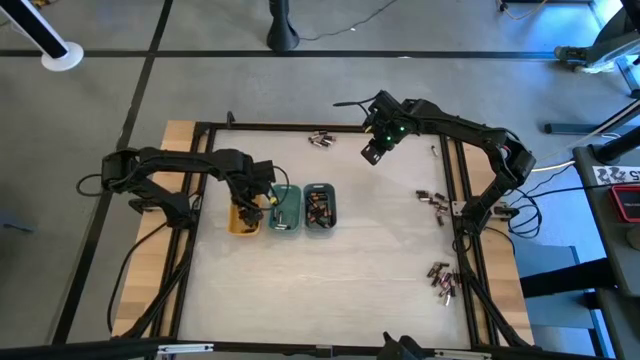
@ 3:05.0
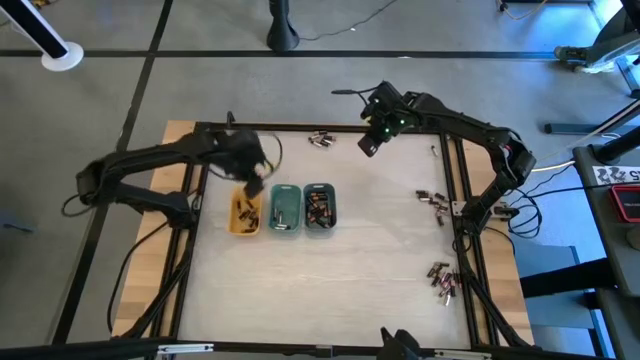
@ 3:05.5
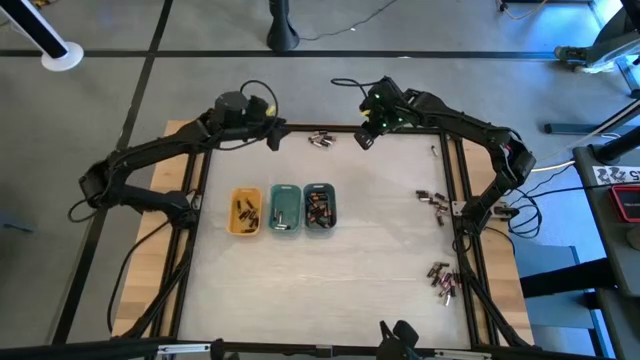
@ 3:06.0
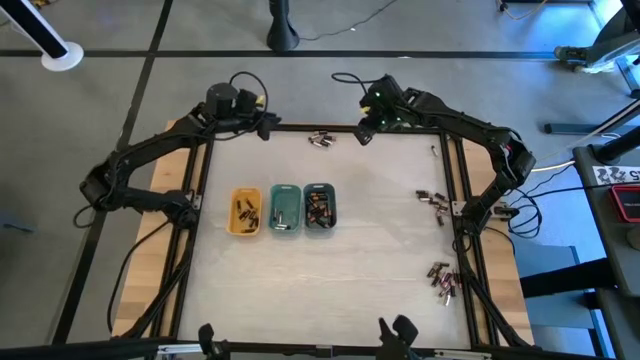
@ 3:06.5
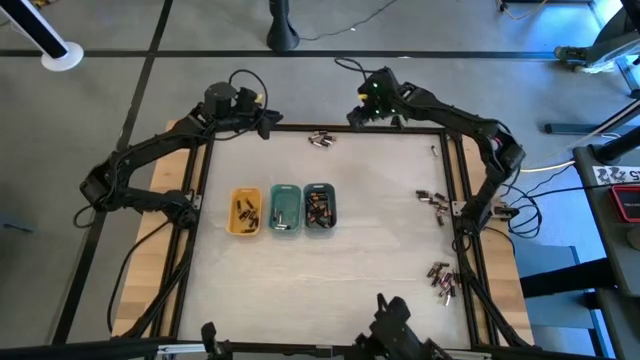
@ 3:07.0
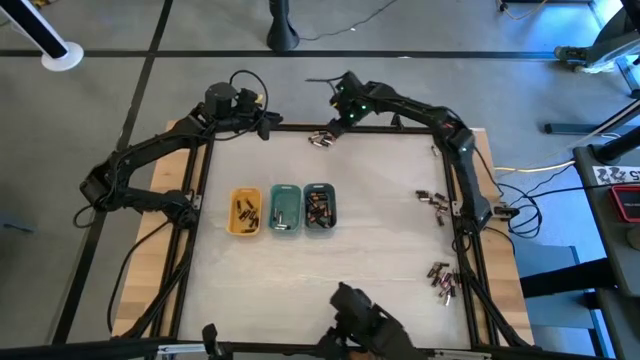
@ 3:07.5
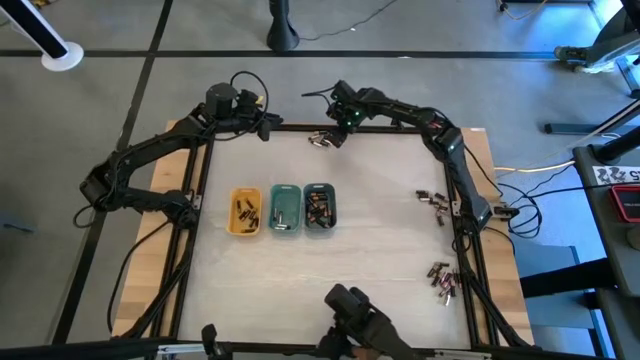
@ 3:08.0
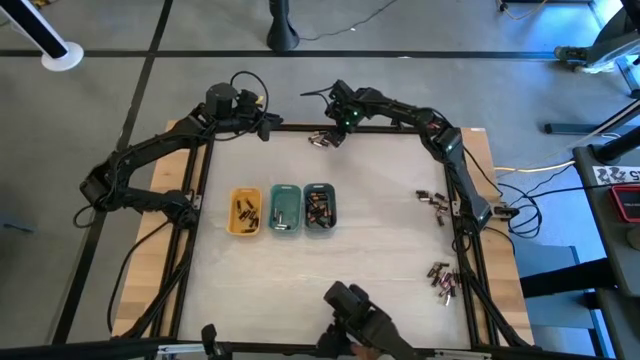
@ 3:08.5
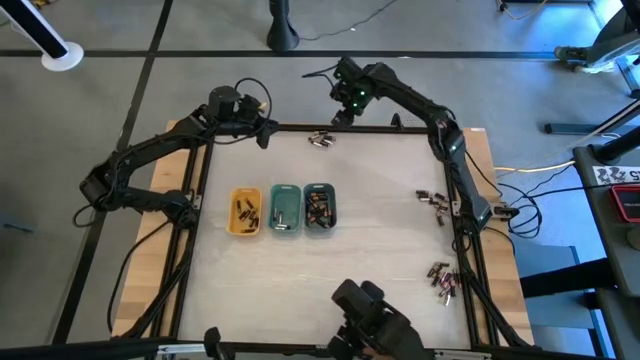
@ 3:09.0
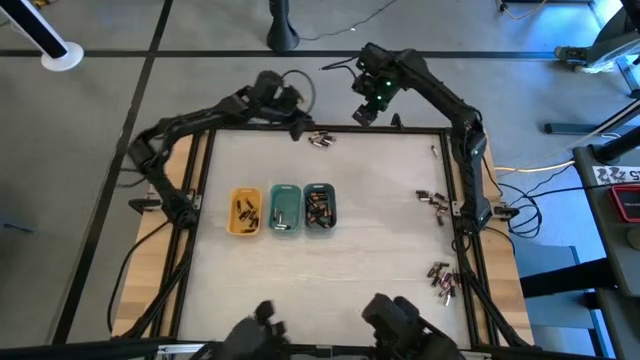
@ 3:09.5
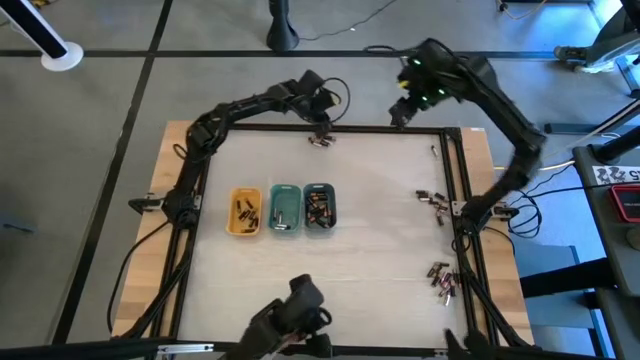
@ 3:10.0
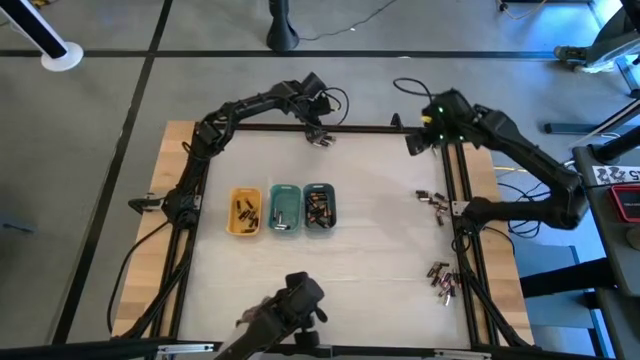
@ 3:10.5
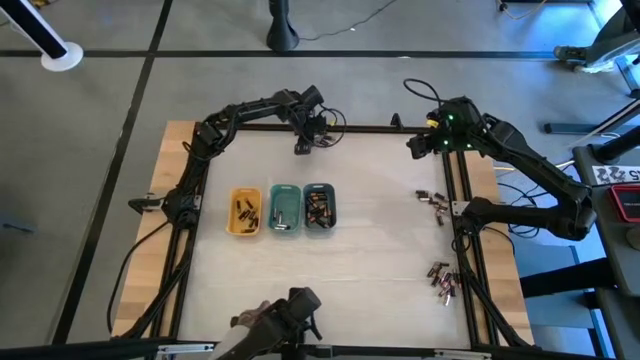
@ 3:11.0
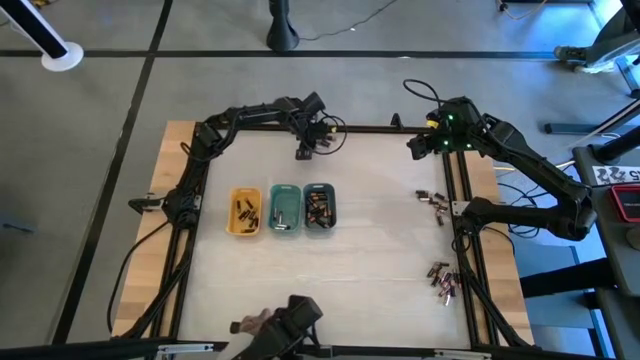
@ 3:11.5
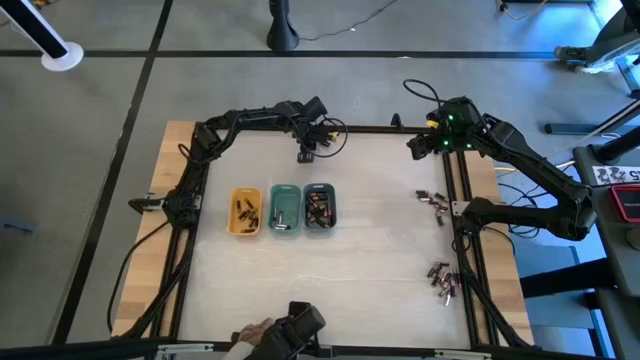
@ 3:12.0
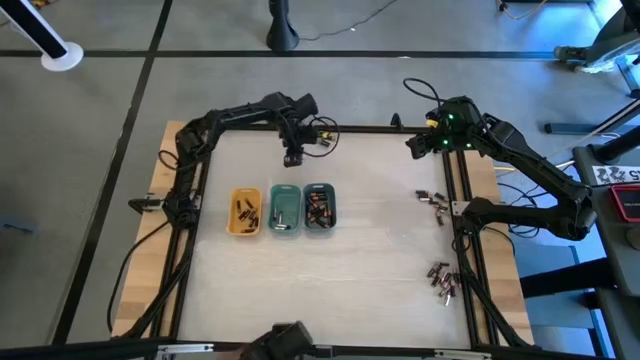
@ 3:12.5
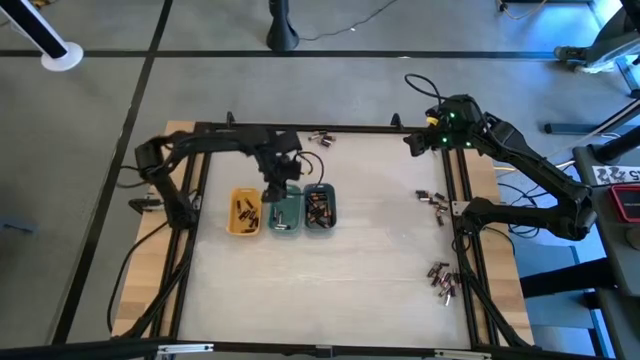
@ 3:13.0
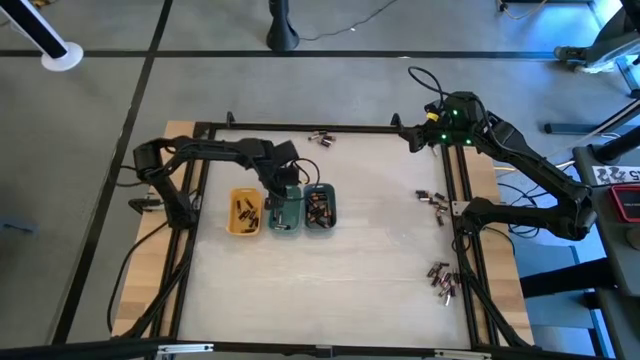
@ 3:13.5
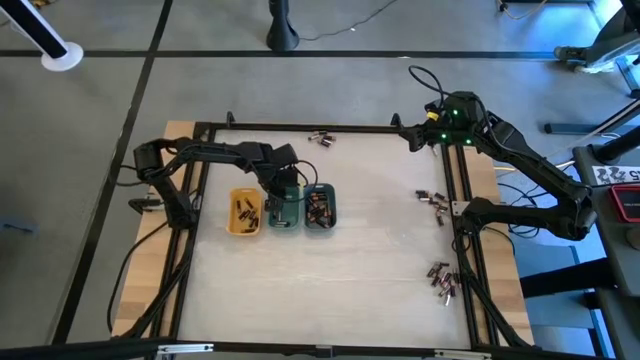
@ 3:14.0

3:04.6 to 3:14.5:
Task: Sort batteries
Put the silver battery into the green bin

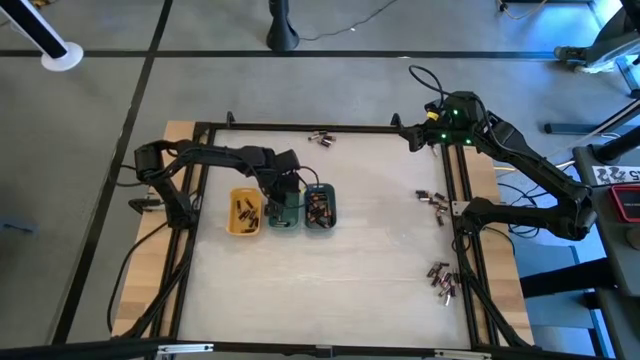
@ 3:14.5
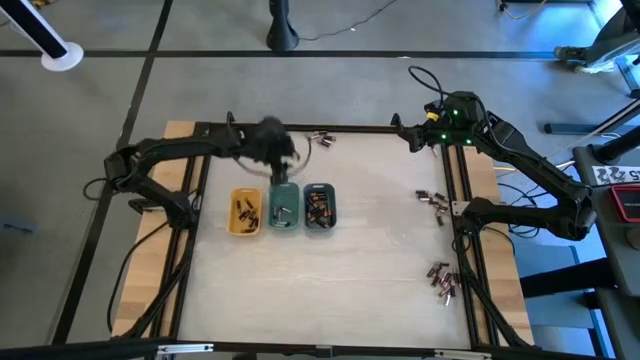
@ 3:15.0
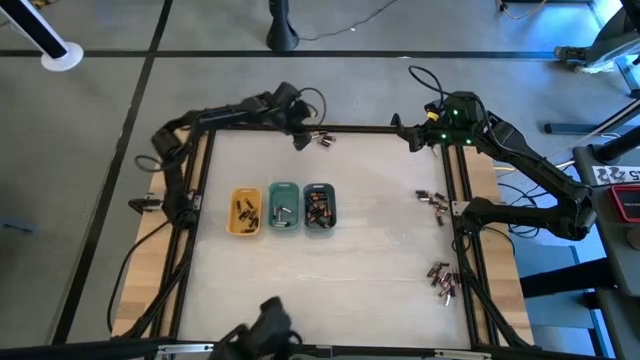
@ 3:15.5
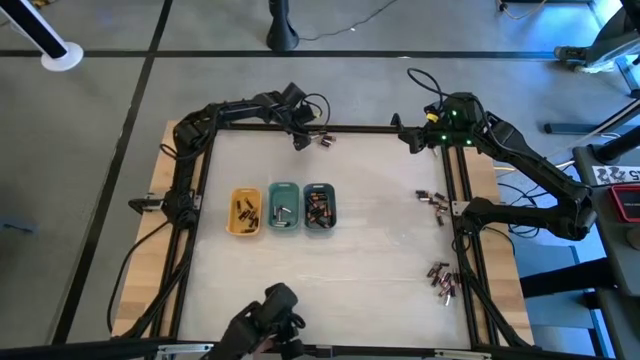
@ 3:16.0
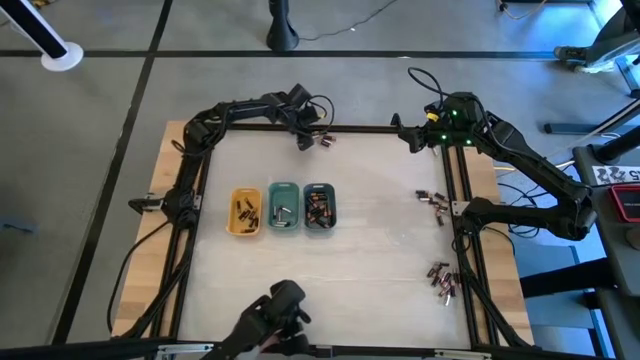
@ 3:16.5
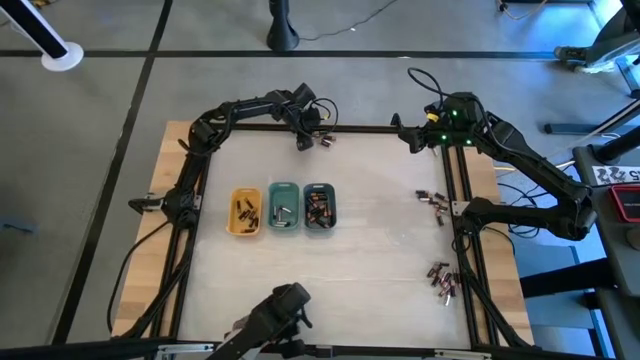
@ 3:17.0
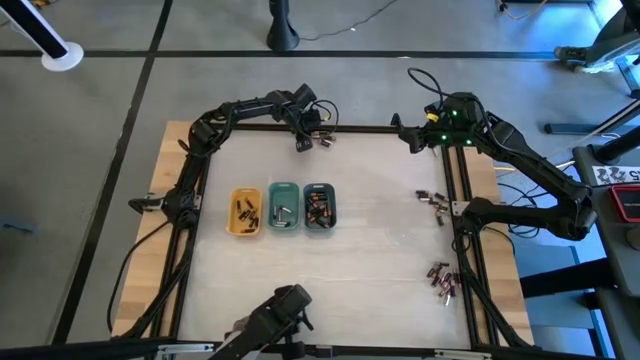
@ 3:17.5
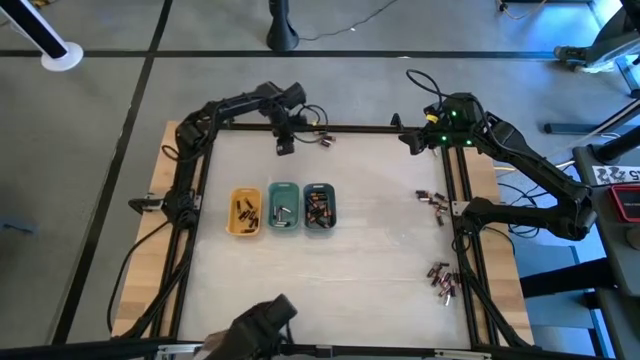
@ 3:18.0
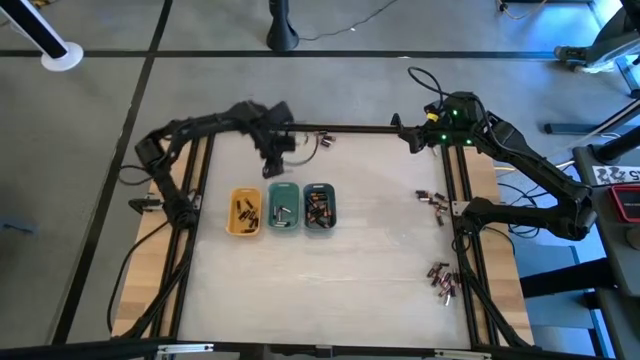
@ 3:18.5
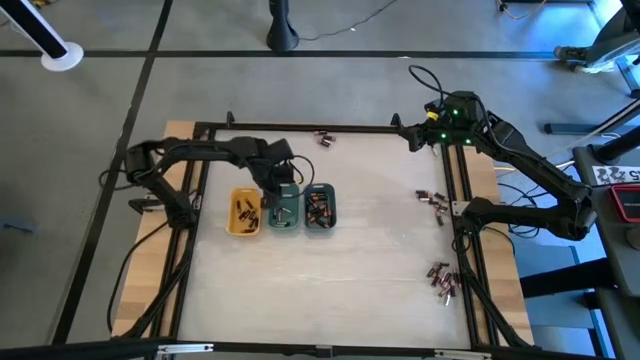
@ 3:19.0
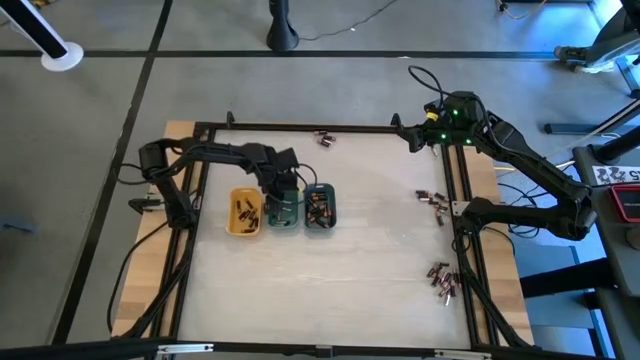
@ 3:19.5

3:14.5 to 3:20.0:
Put the silver battery into the green bin

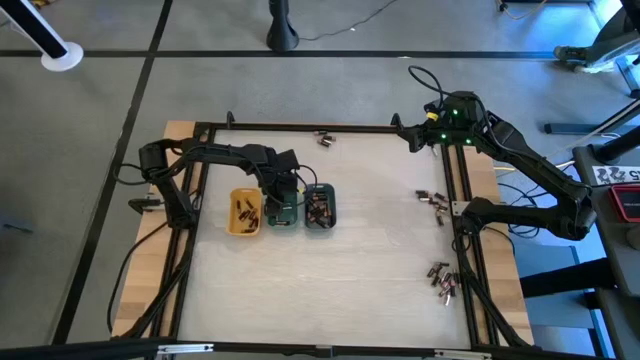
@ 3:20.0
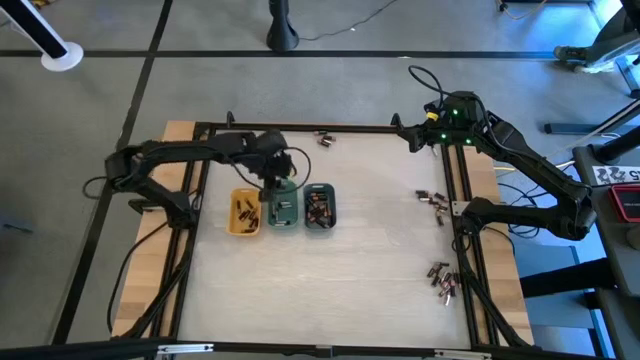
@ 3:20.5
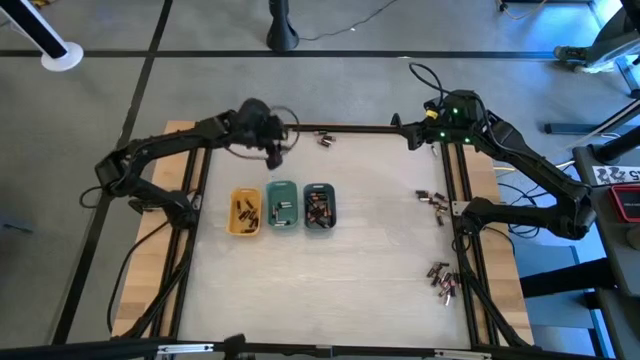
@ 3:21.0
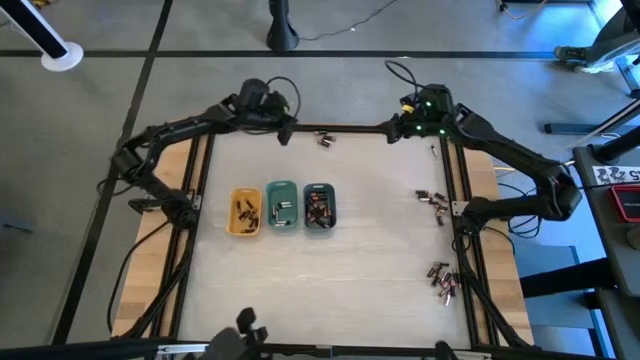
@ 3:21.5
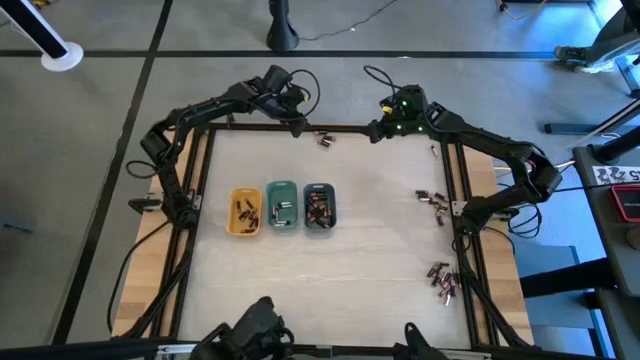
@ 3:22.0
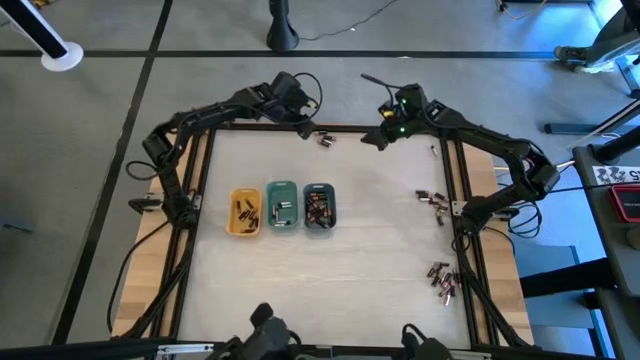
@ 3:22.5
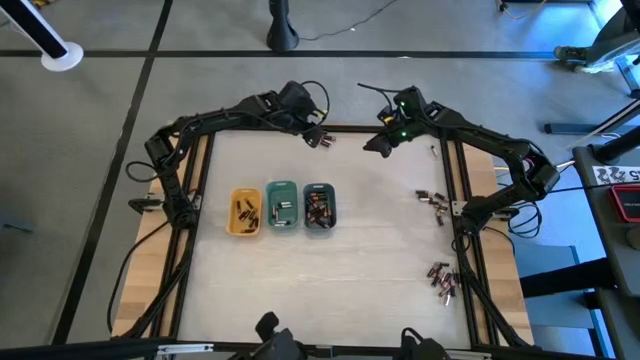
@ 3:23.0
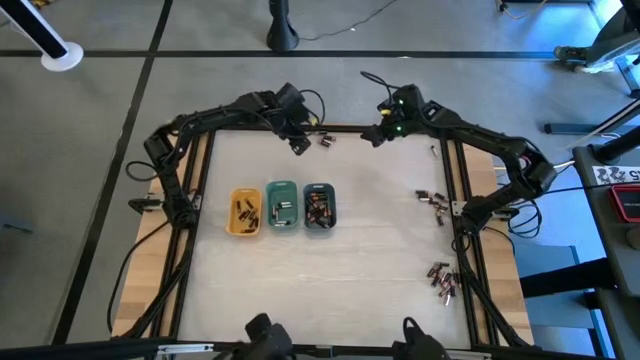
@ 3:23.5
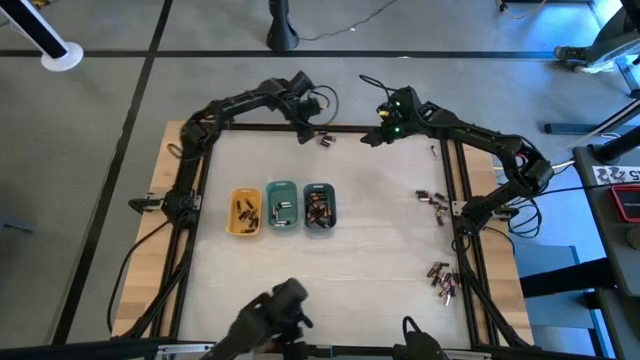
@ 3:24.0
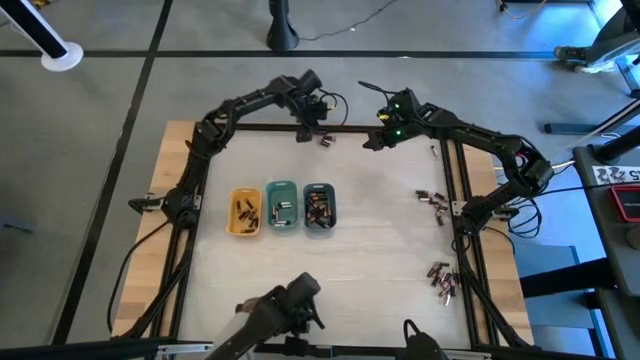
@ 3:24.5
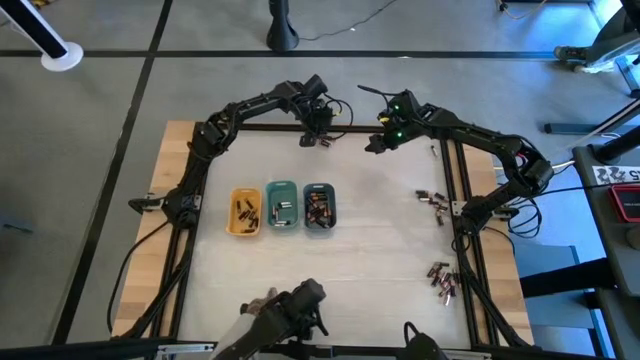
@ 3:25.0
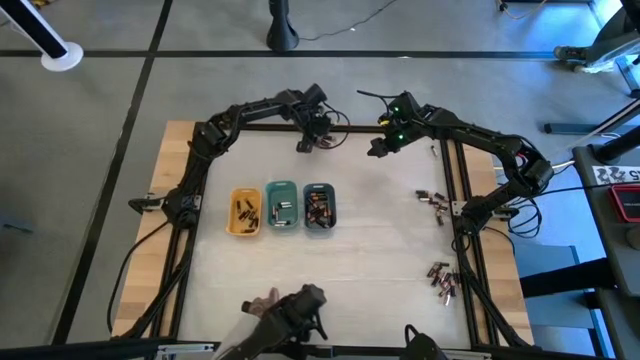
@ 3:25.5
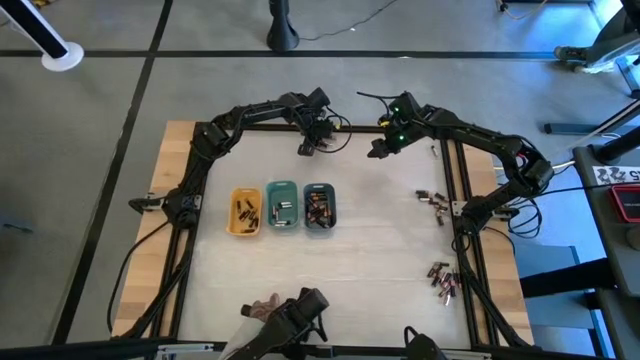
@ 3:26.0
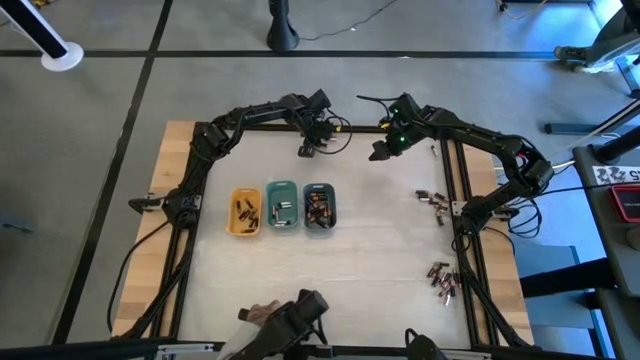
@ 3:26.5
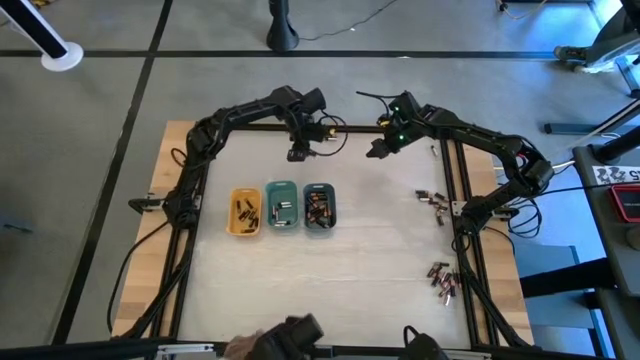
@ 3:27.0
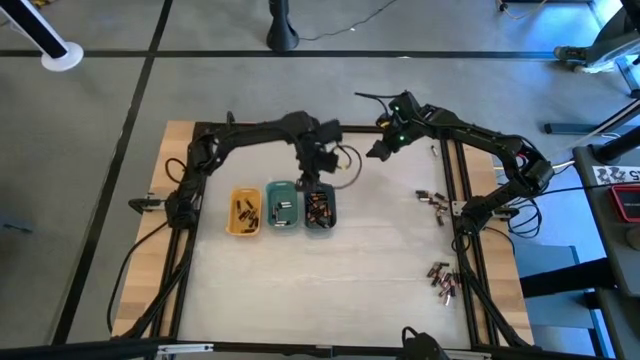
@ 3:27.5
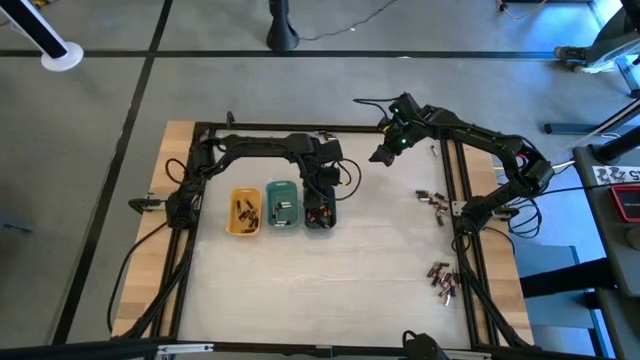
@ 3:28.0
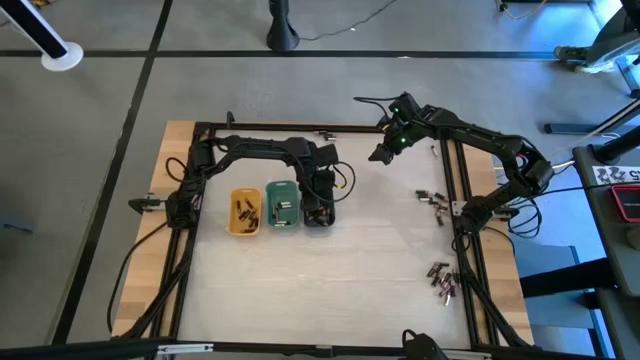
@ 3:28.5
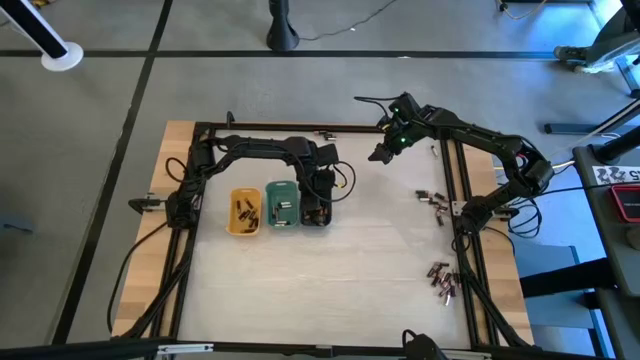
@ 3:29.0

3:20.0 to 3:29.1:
Put the large black battery into the blue bin
